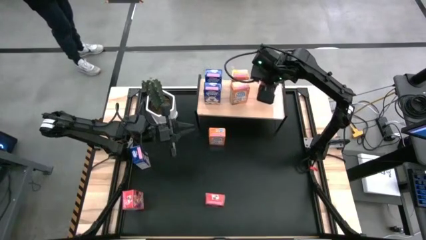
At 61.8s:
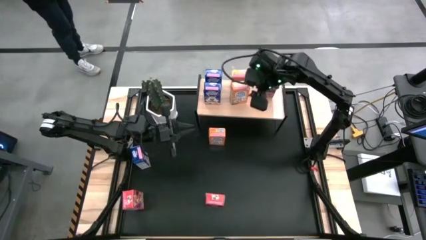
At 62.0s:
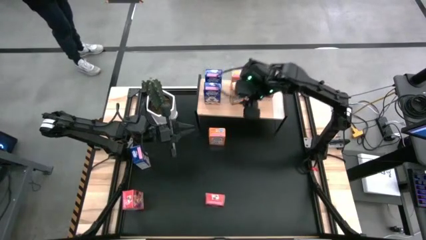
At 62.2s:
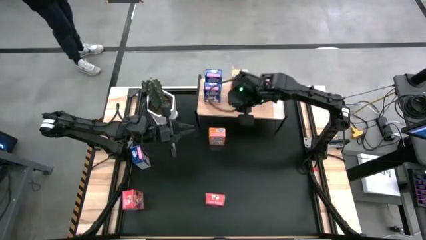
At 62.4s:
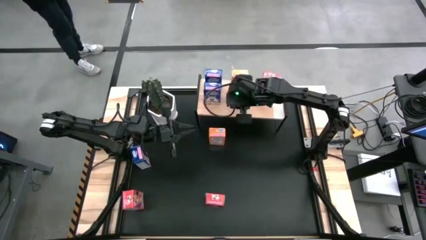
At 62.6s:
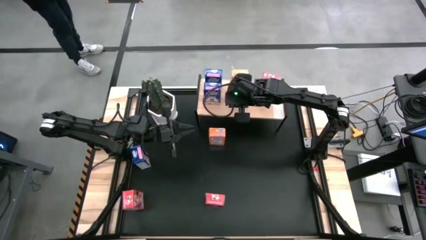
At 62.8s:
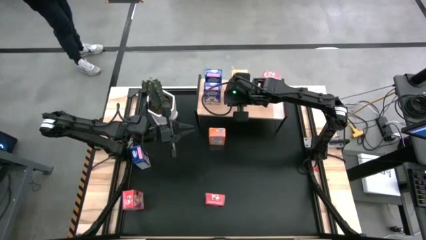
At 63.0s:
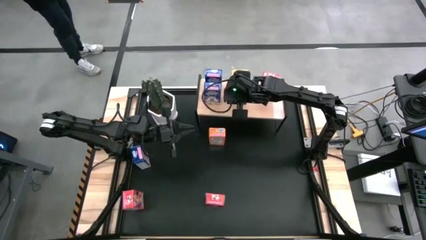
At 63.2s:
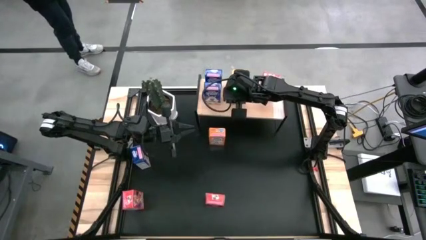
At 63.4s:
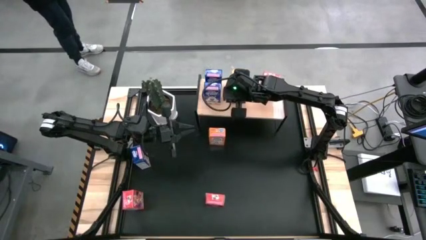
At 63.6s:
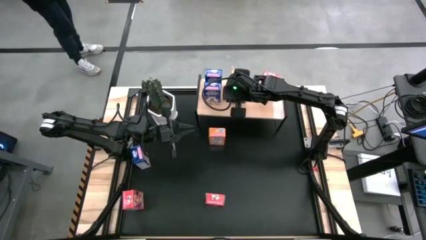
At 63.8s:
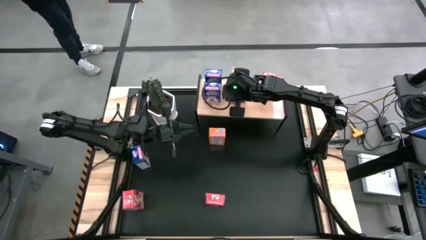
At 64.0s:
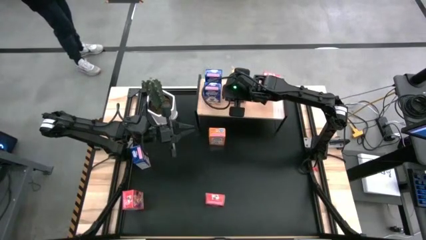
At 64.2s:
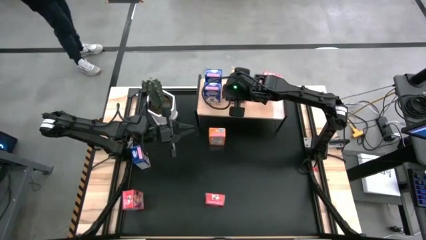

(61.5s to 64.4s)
Task: Stack cereal on shelf
Adjust the orange cereal box on the shelf

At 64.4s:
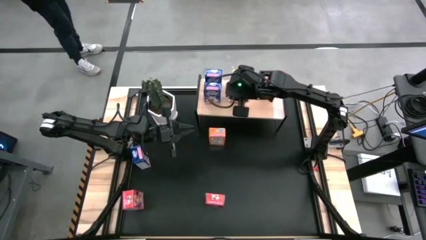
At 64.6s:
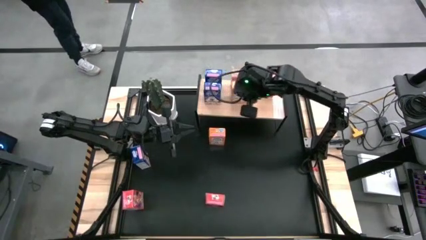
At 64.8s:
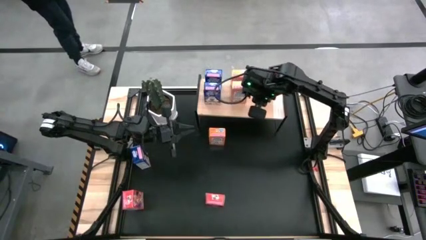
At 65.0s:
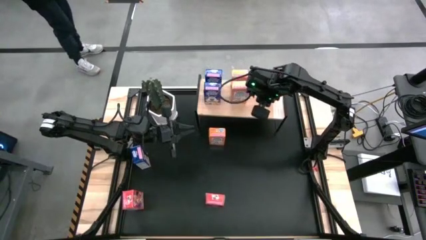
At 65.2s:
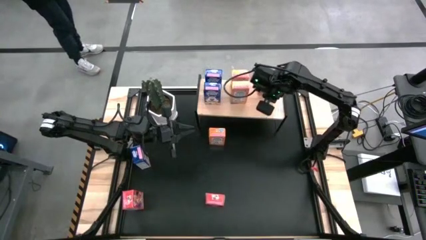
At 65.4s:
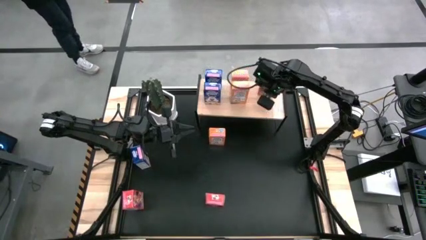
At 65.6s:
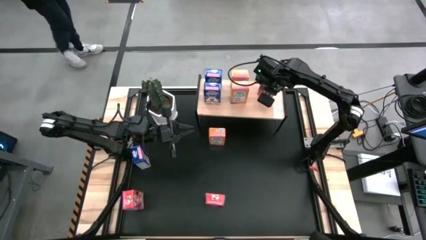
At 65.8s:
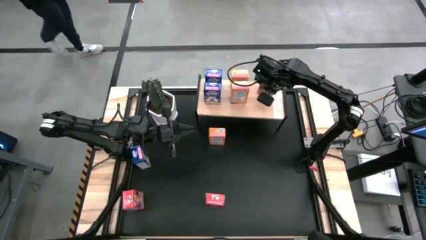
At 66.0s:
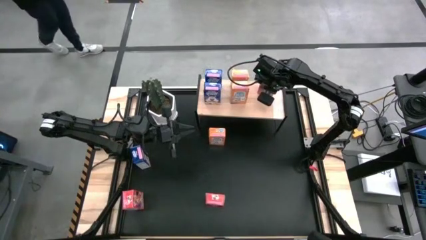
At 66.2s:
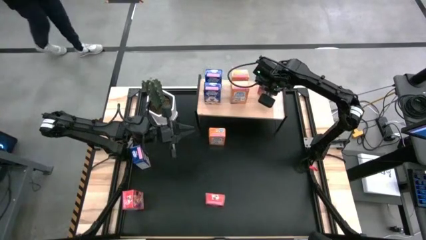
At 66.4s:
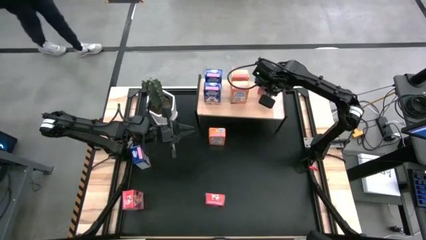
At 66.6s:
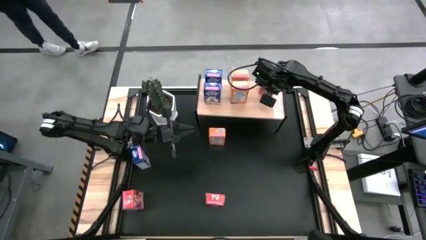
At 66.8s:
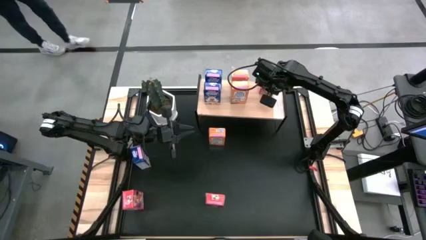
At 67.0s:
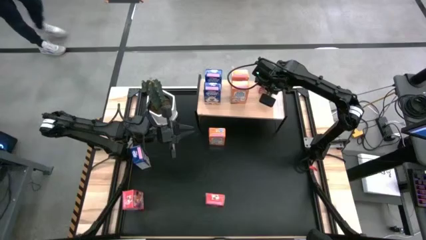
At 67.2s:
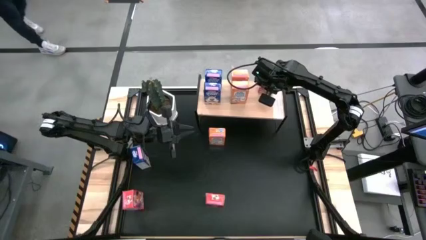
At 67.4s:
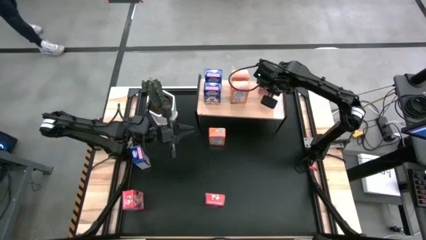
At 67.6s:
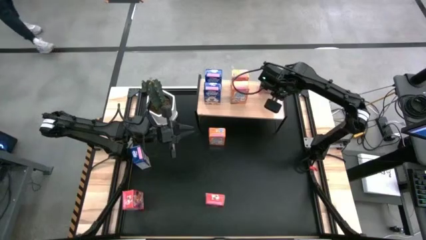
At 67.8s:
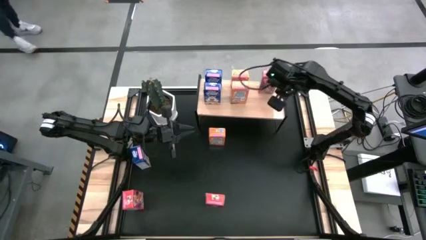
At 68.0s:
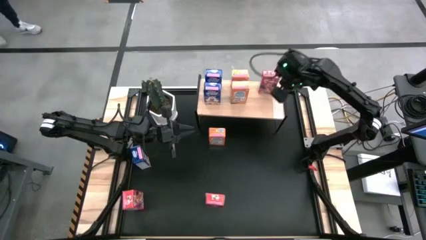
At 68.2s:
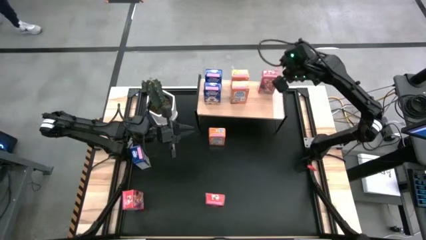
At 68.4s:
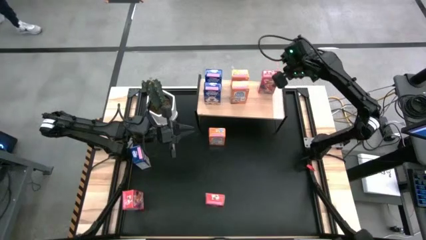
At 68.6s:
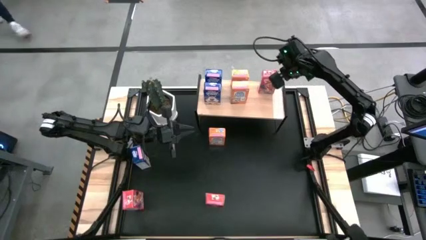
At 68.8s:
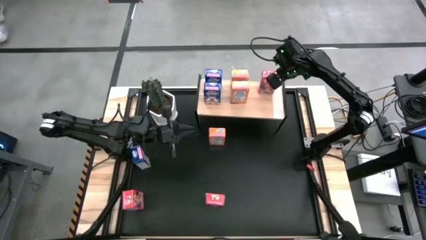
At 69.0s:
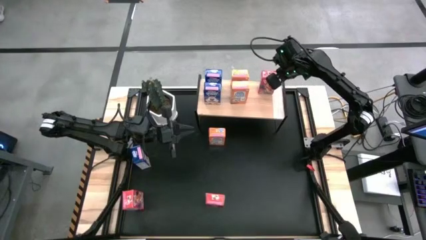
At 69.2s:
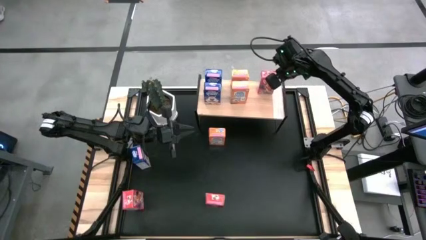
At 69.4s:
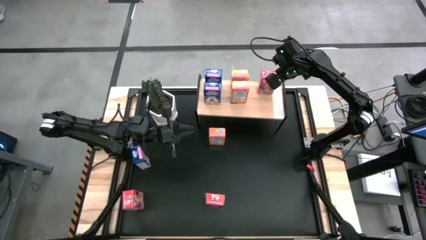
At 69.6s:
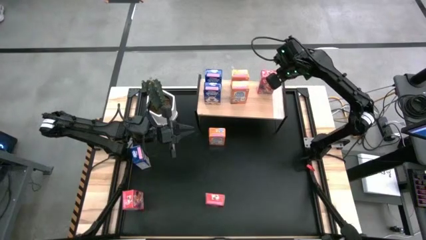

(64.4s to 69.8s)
Adjust the red cereal box on the shelf

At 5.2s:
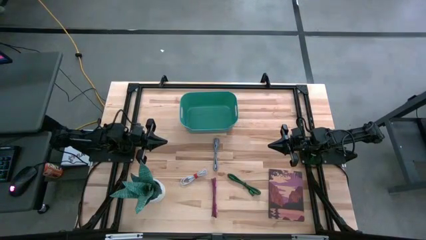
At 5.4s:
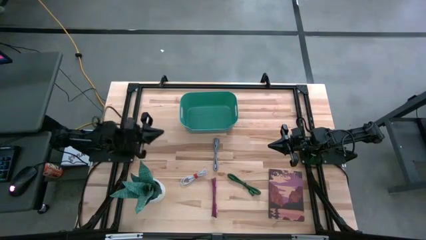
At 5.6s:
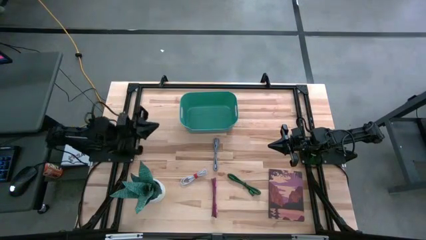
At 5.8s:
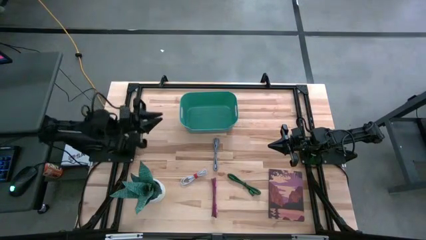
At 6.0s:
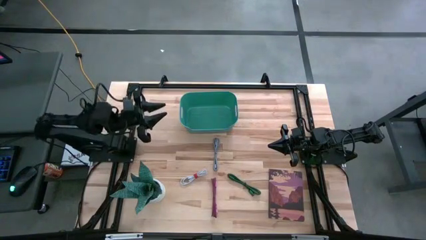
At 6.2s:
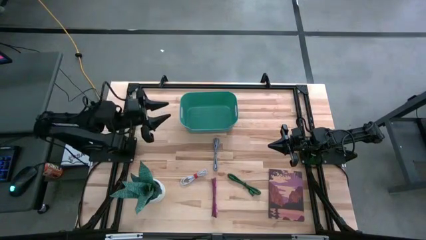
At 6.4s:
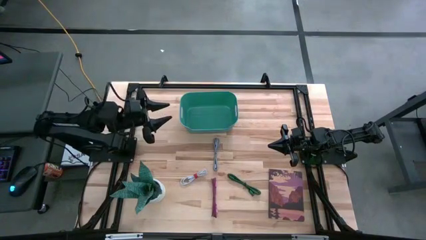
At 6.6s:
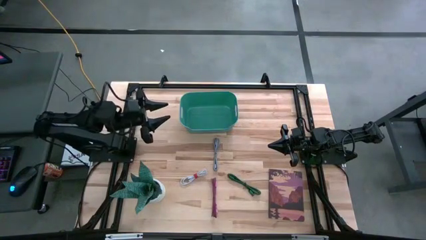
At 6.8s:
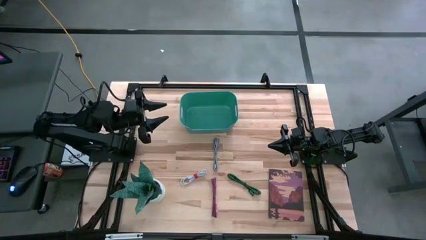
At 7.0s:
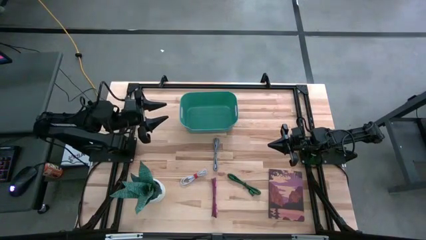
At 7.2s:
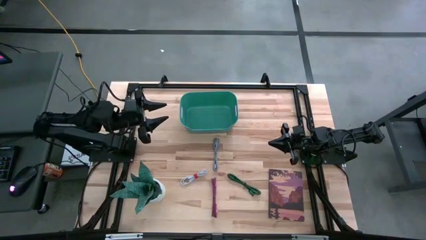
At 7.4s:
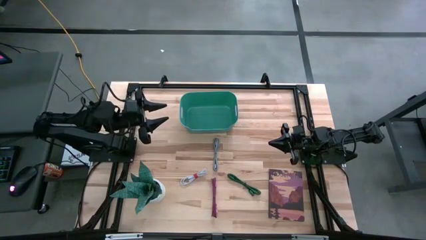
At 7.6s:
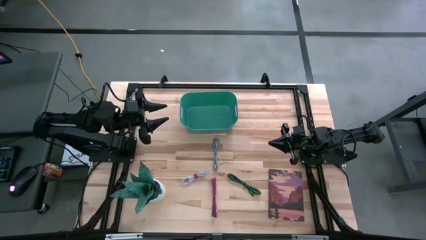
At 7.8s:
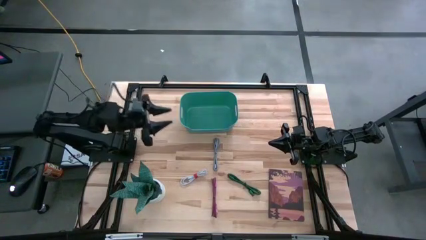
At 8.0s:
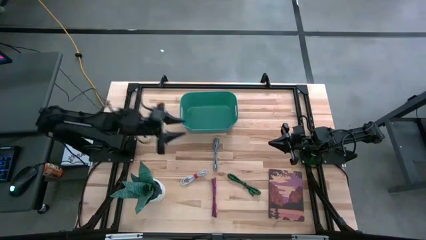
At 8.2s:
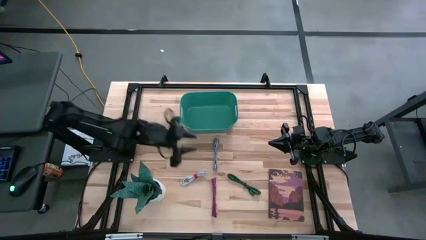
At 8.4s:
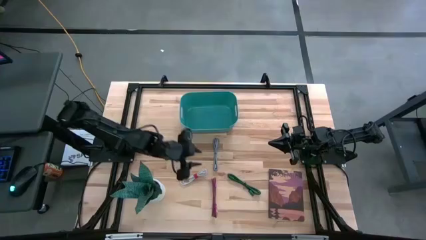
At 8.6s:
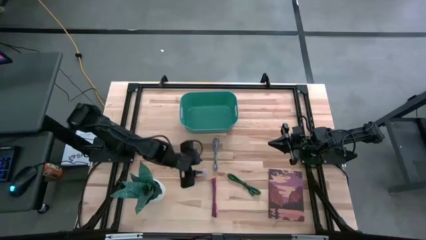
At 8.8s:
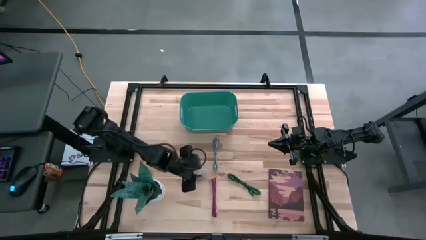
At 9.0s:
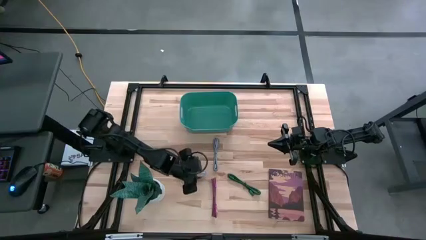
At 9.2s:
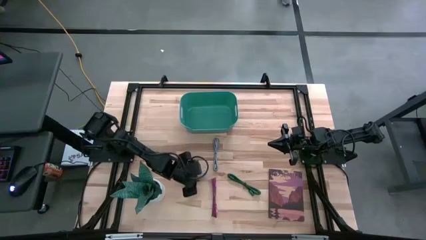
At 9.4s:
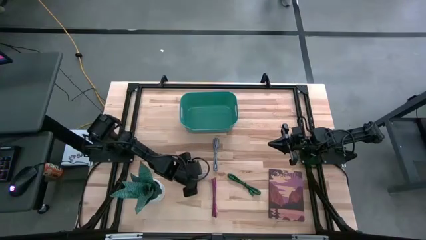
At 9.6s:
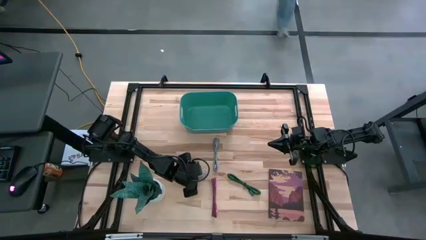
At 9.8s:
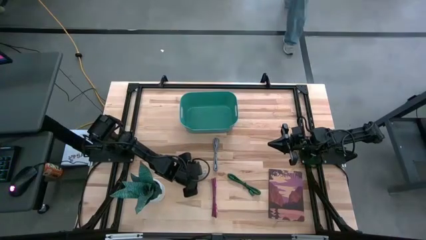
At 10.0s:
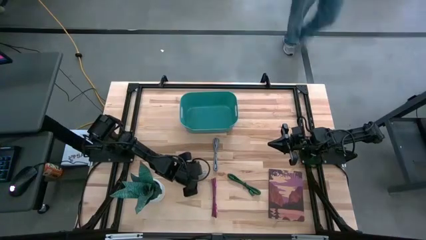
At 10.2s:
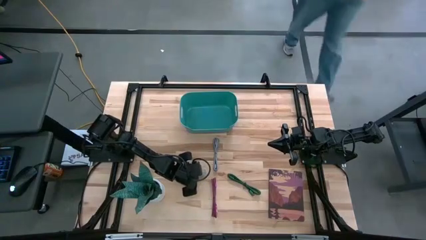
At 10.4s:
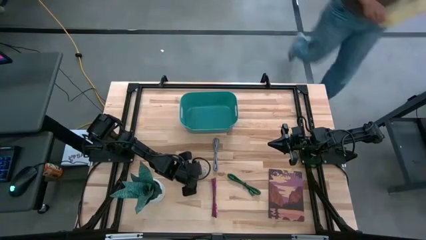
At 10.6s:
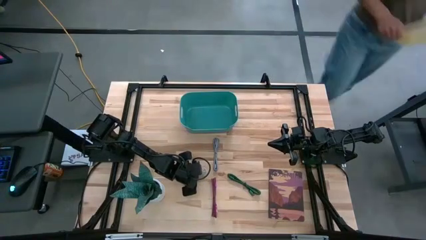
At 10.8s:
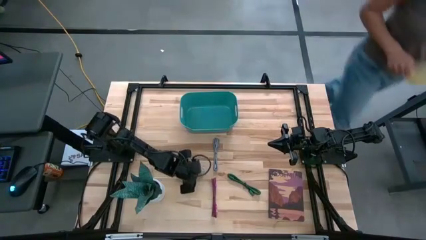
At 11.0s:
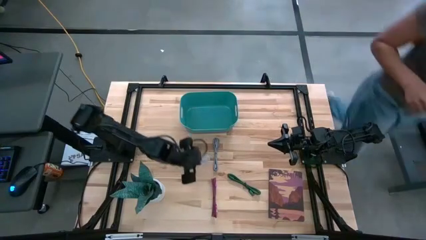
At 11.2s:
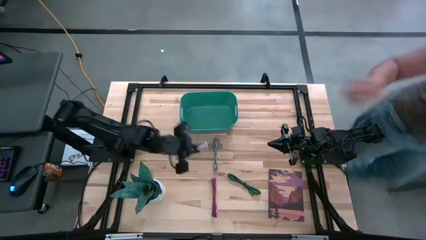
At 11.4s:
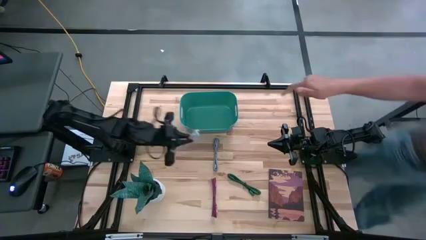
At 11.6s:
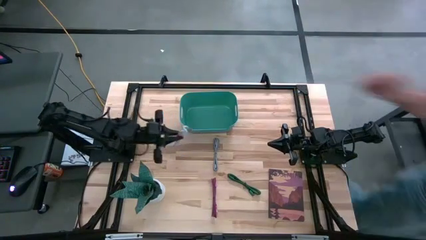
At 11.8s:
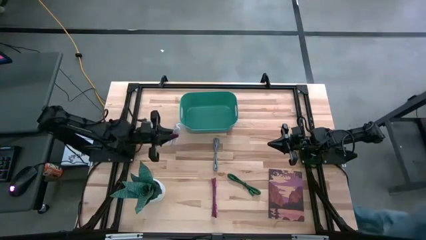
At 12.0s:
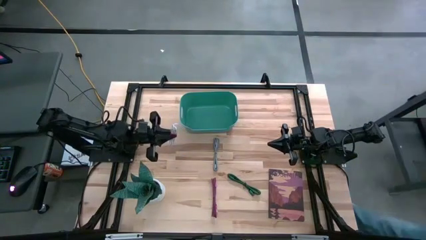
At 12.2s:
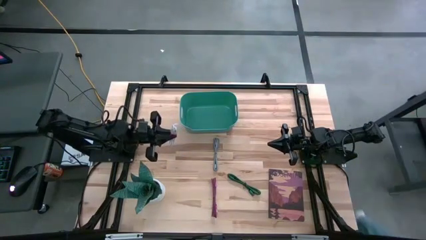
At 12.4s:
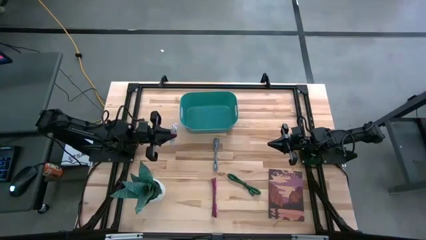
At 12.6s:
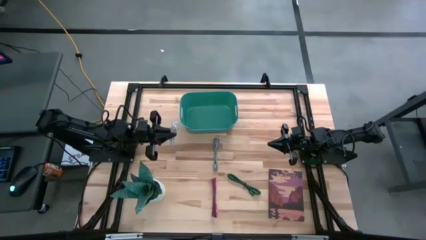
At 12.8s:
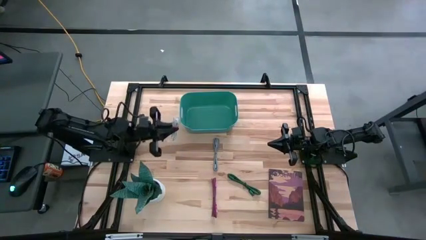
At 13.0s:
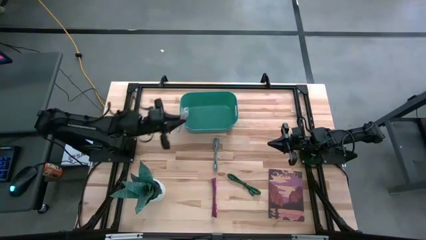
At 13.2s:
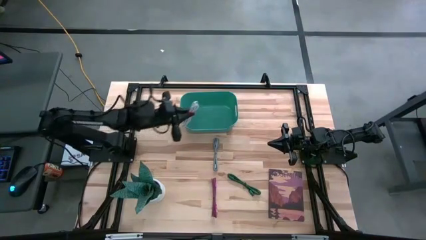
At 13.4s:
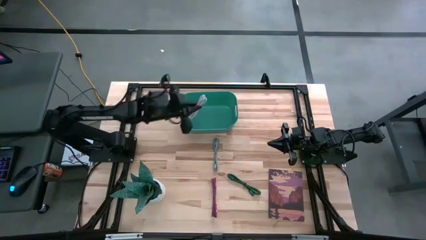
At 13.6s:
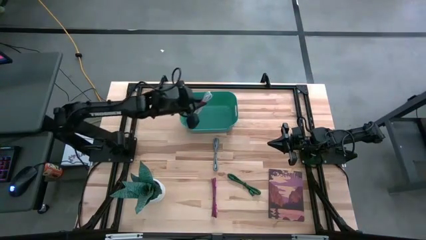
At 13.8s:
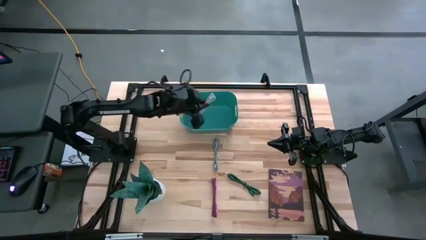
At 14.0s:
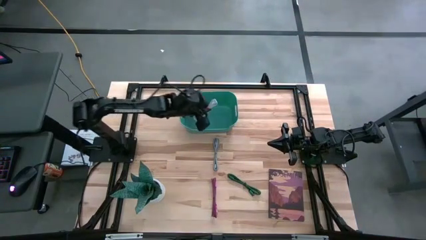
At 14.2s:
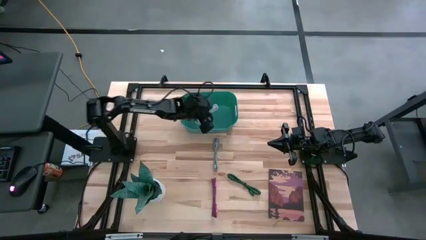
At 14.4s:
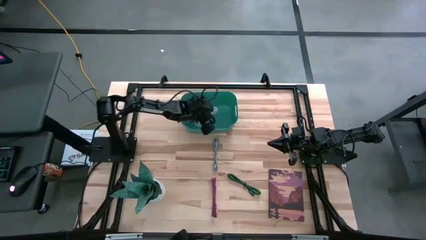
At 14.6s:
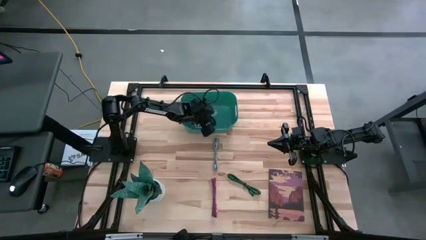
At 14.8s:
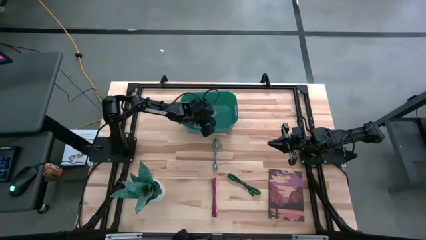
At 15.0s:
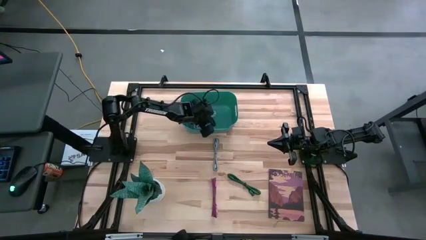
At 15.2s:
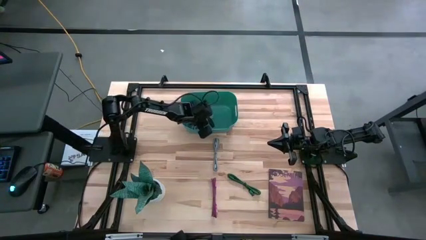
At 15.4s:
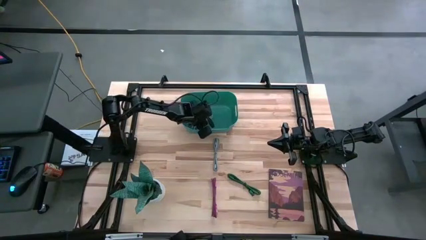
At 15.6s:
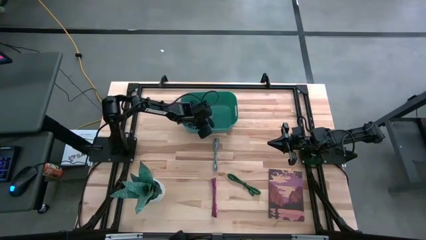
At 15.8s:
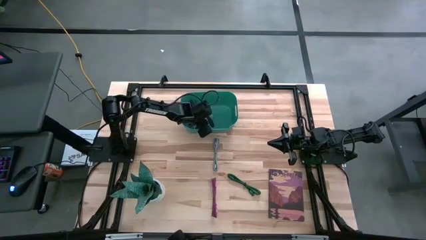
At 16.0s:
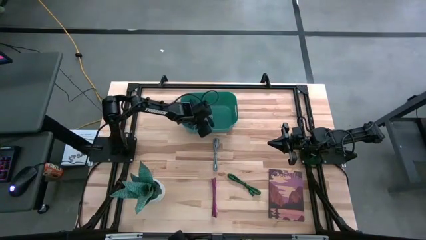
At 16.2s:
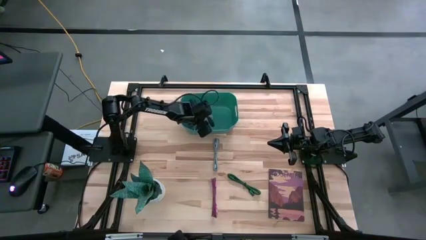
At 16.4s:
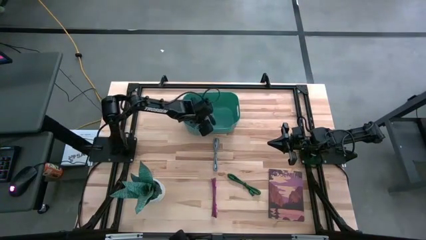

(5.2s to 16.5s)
Task: Pick and place USB-C Cables
Put the white charger cable into the green bin
